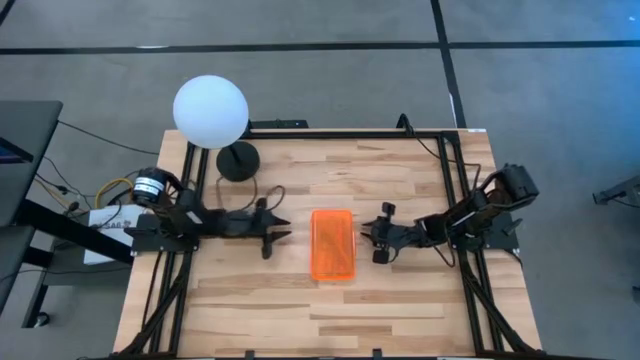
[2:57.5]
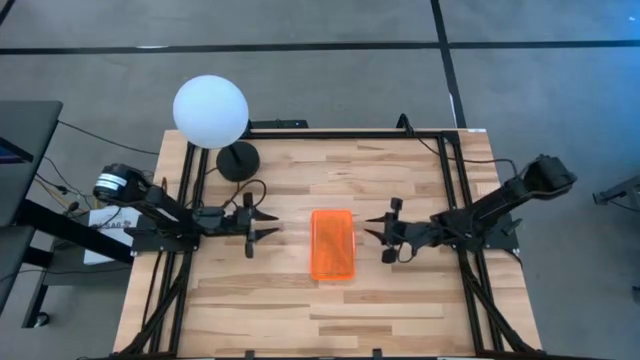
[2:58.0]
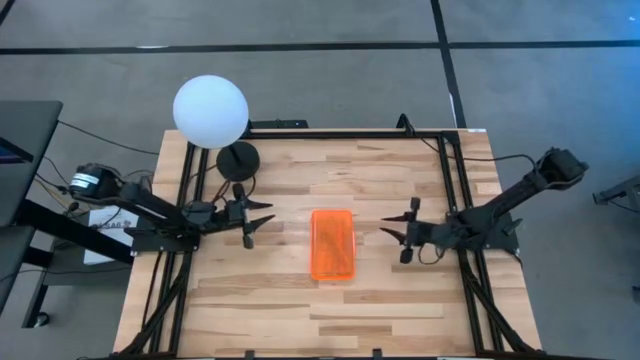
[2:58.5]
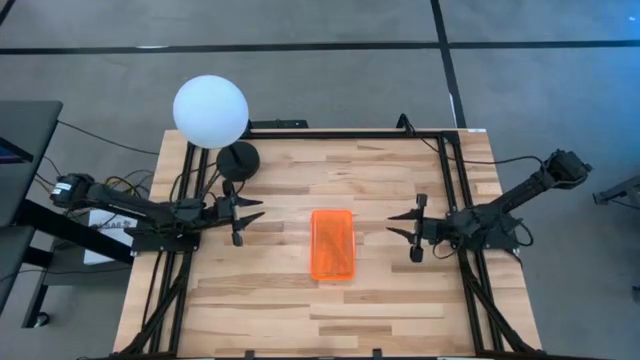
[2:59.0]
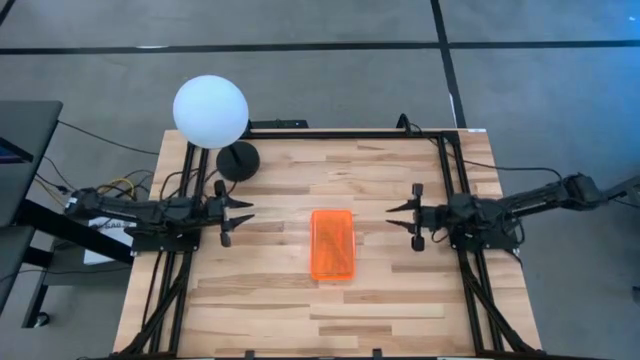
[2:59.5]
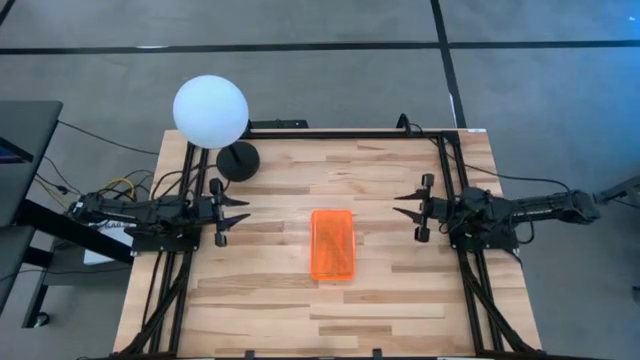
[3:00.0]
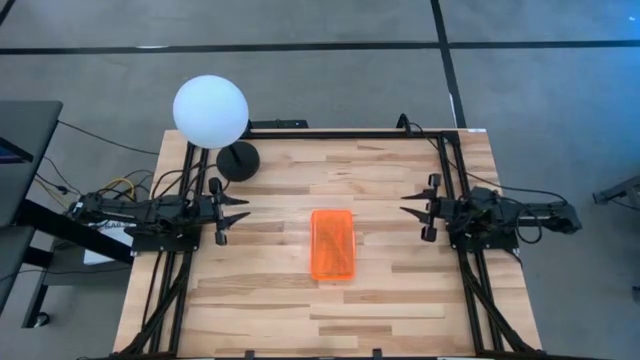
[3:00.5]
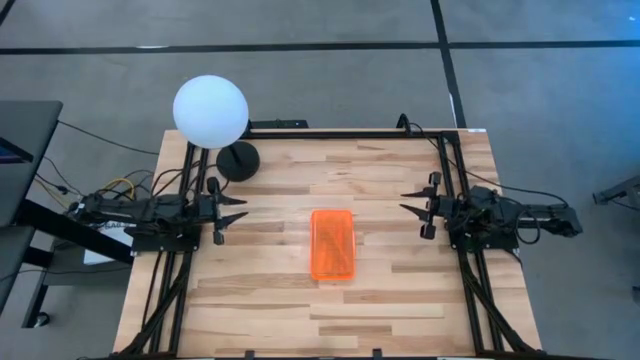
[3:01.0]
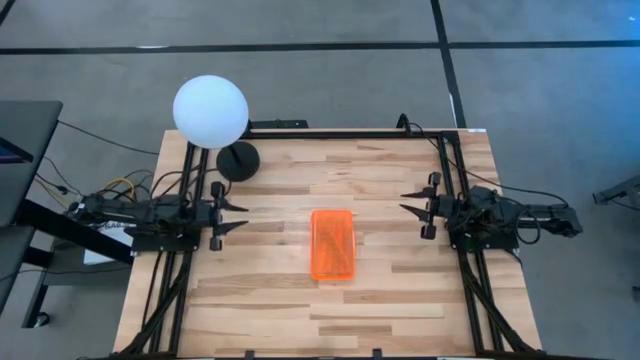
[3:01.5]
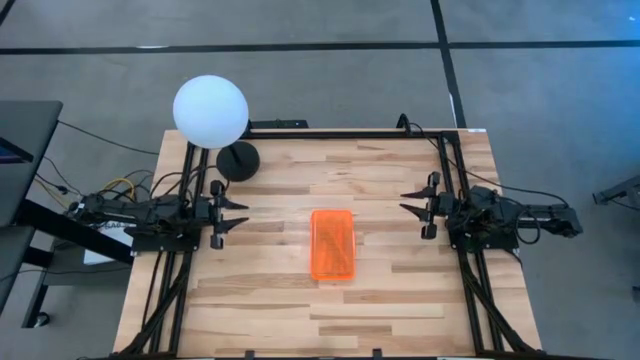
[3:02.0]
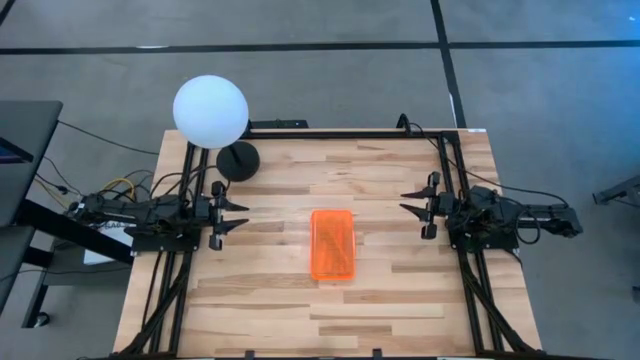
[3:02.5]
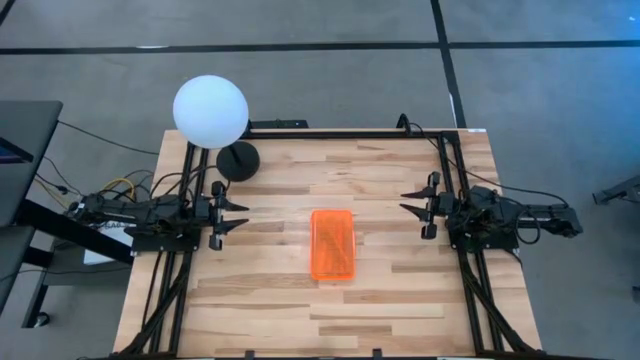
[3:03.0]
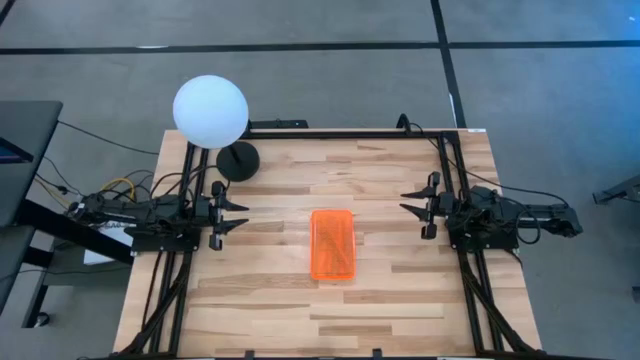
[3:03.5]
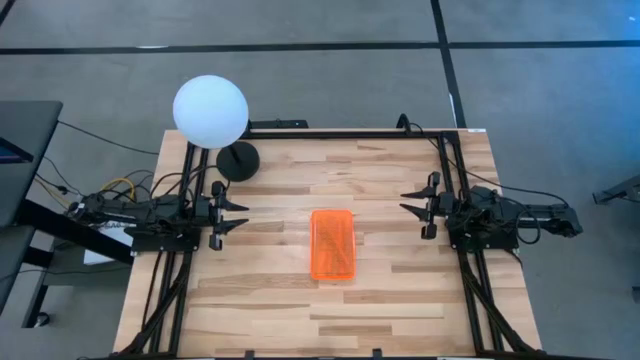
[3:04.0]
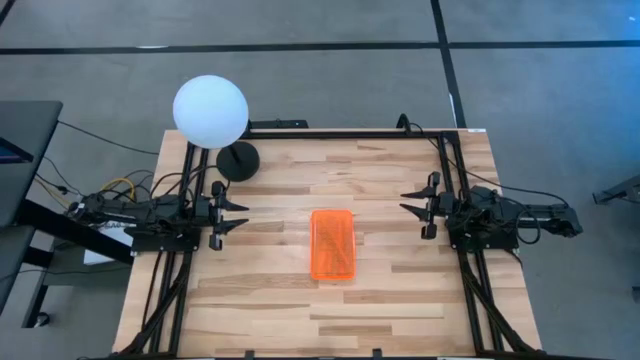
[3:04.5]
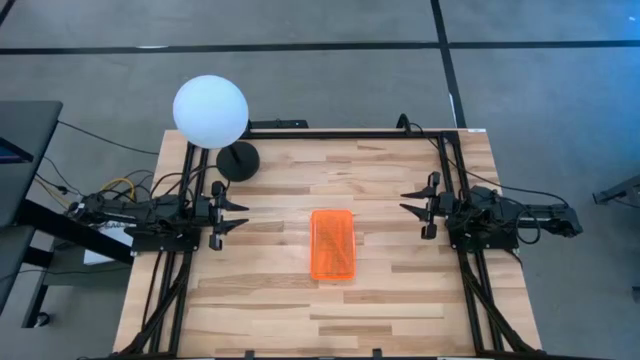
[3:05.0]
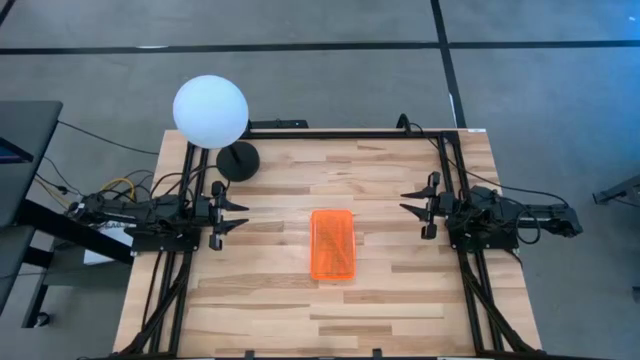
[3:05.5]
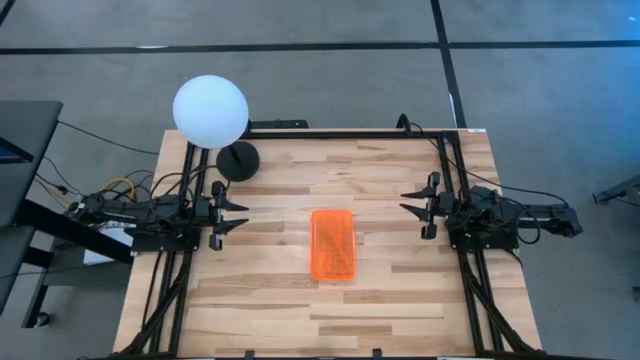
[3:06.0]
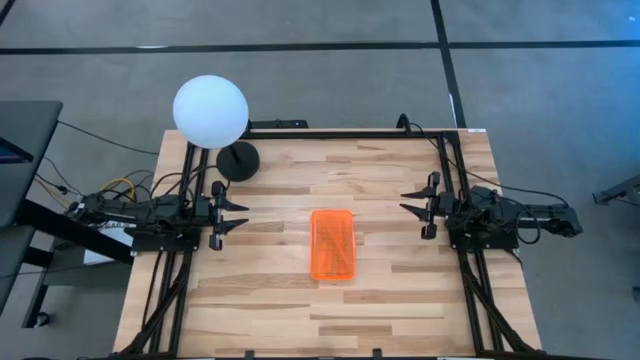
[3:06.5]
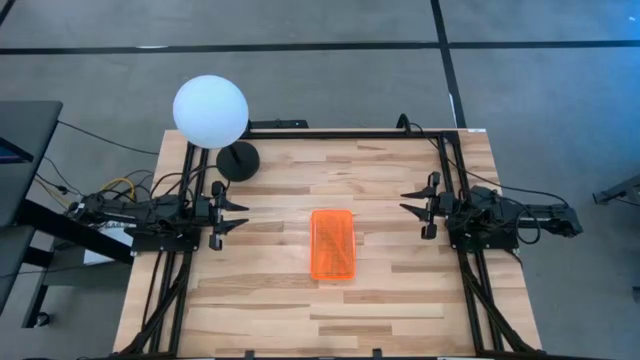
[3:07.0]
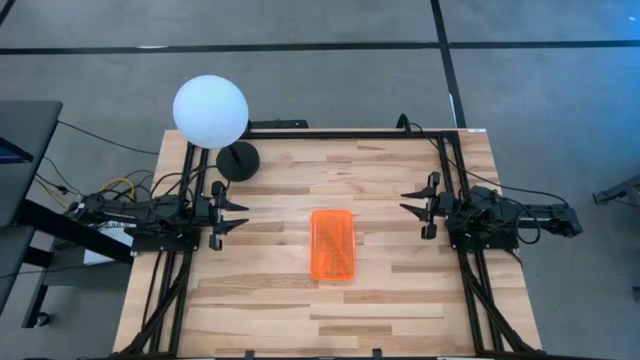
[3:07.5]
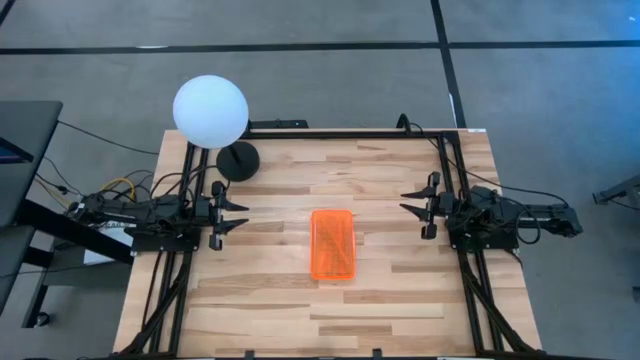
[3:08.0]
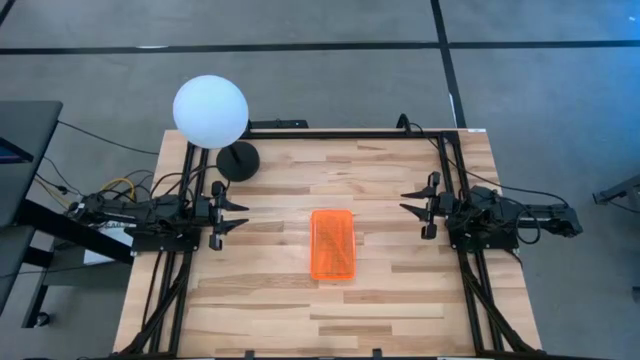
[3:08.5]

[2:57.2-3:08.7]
Task: Pick & place school supplies into a supply box
Return to Home Position

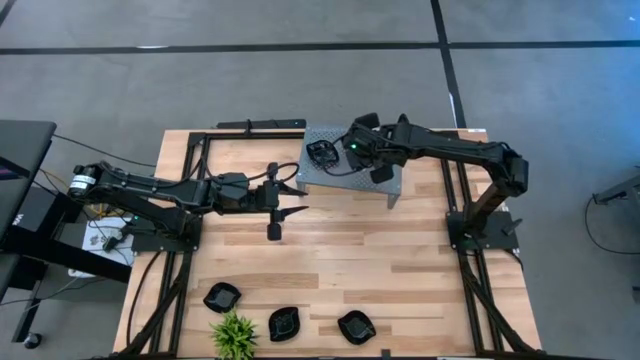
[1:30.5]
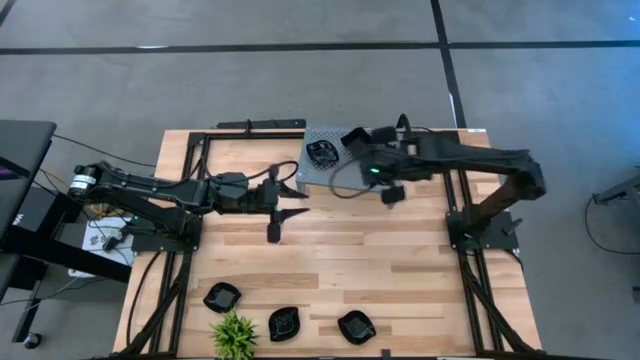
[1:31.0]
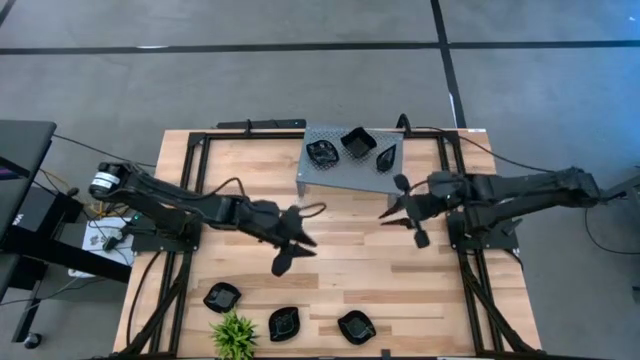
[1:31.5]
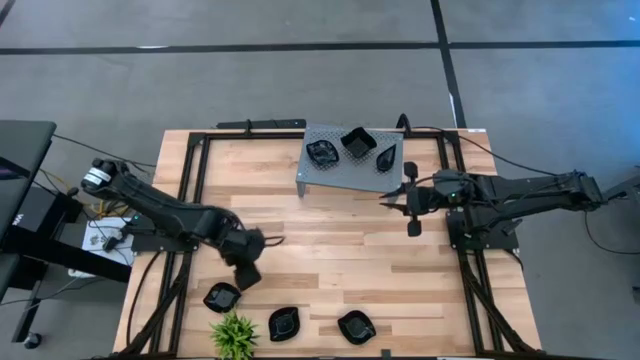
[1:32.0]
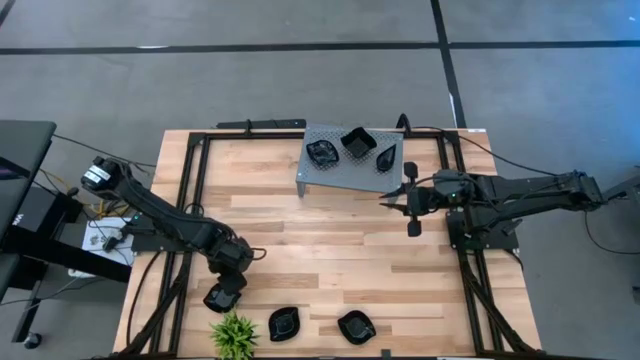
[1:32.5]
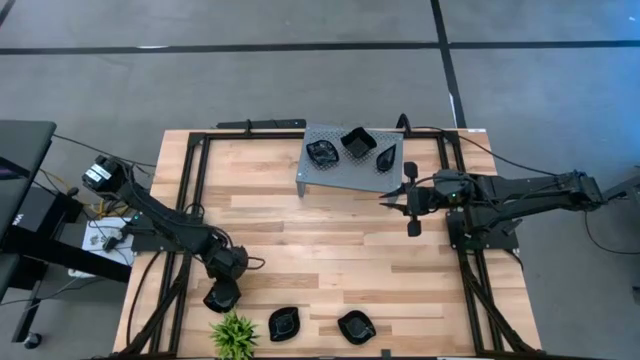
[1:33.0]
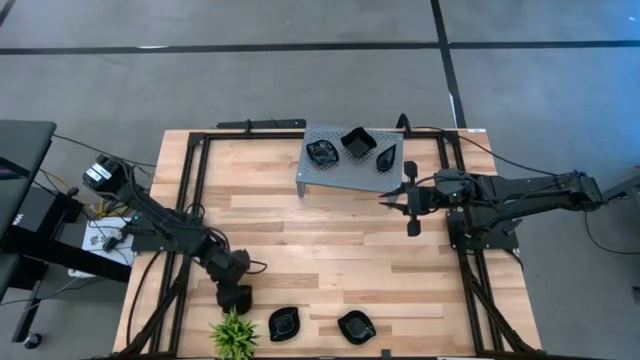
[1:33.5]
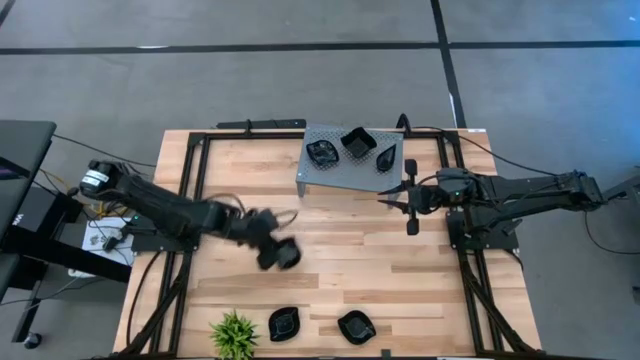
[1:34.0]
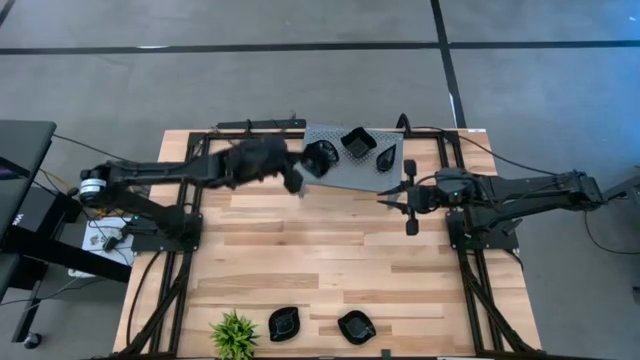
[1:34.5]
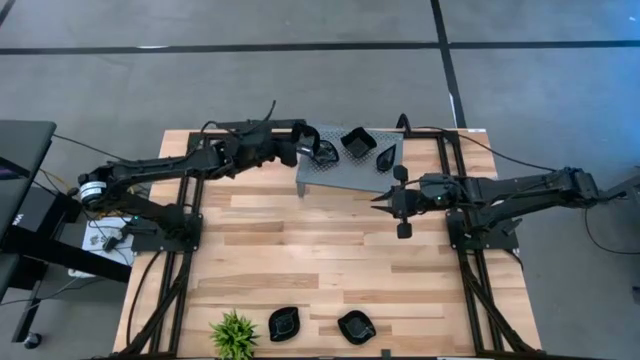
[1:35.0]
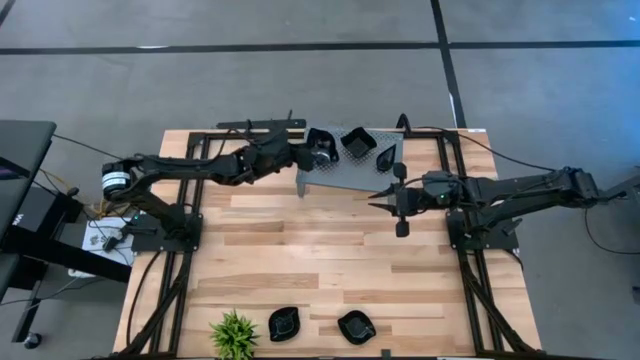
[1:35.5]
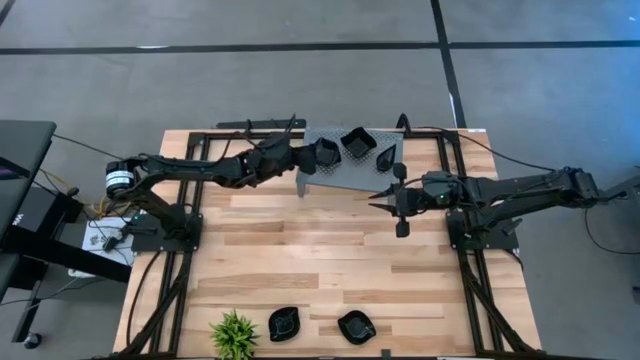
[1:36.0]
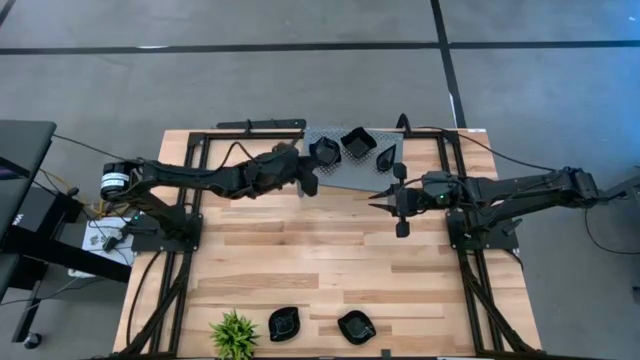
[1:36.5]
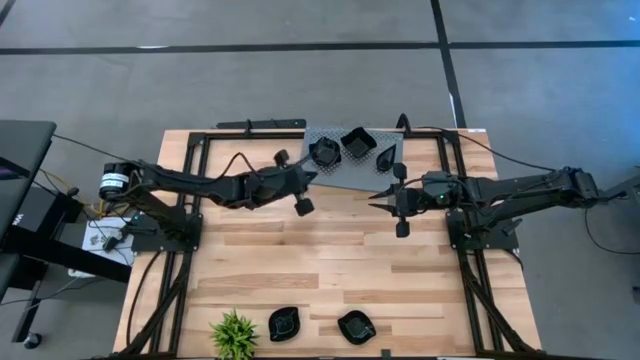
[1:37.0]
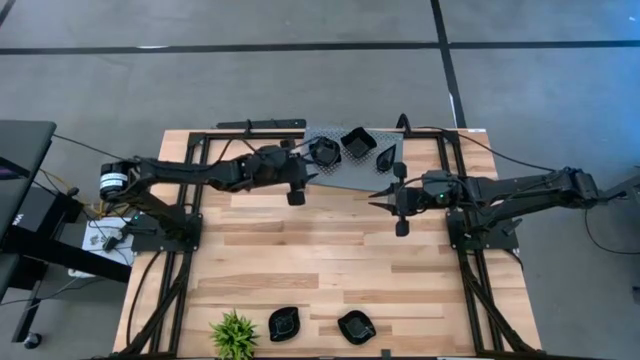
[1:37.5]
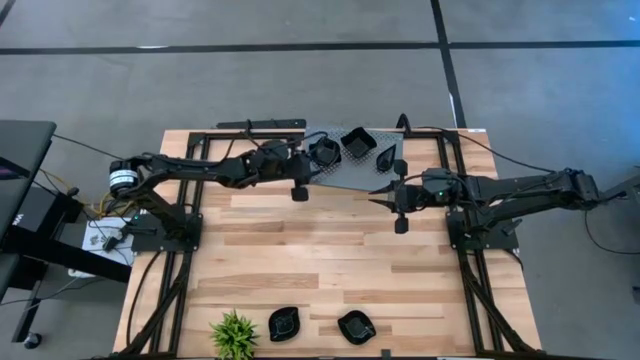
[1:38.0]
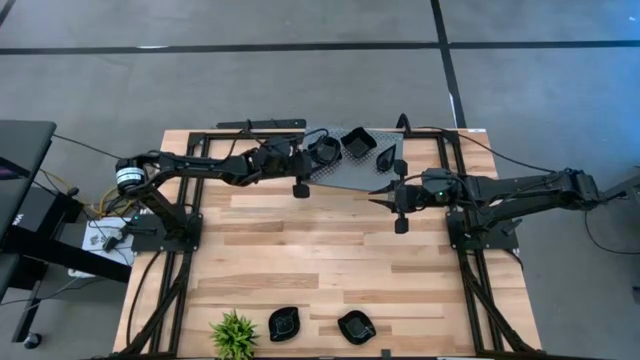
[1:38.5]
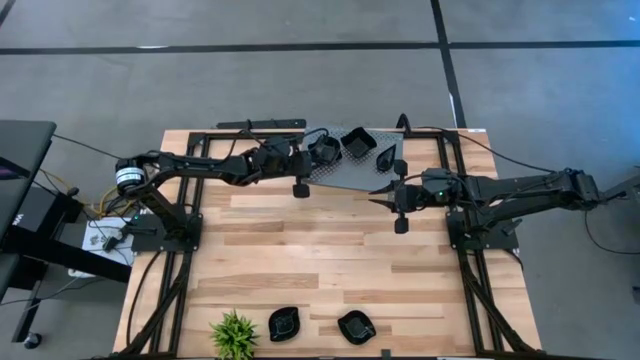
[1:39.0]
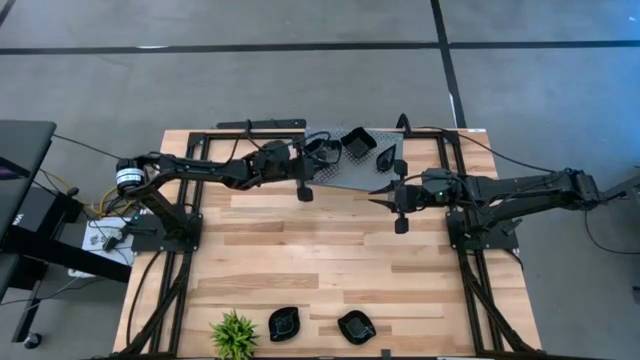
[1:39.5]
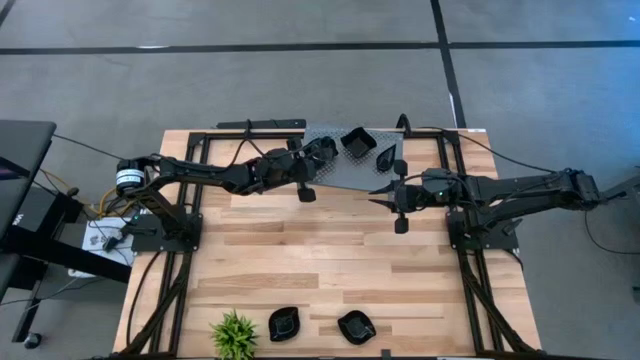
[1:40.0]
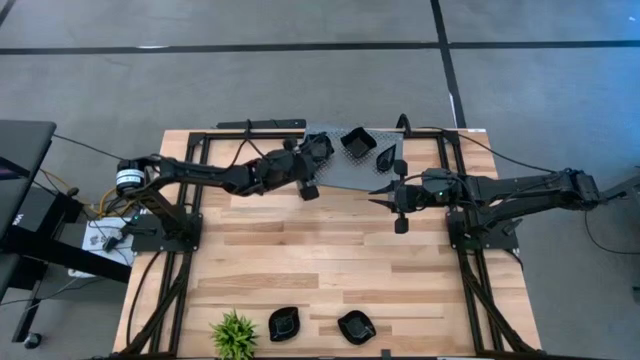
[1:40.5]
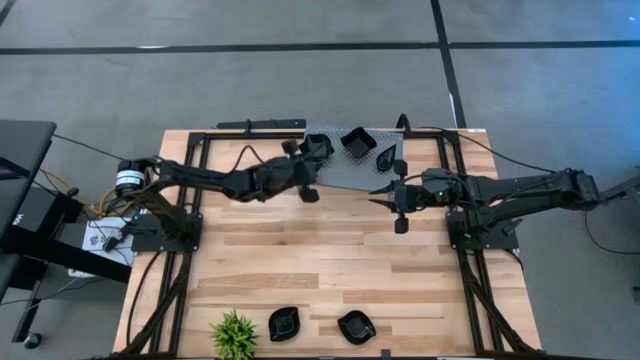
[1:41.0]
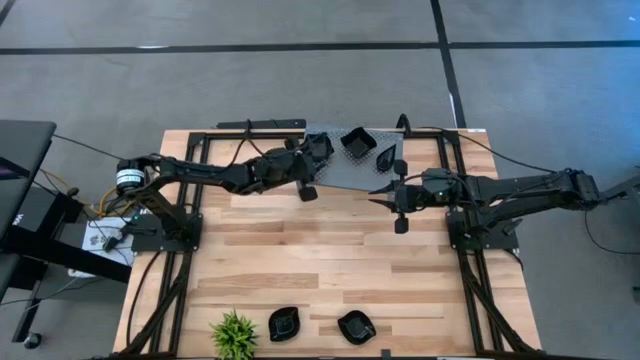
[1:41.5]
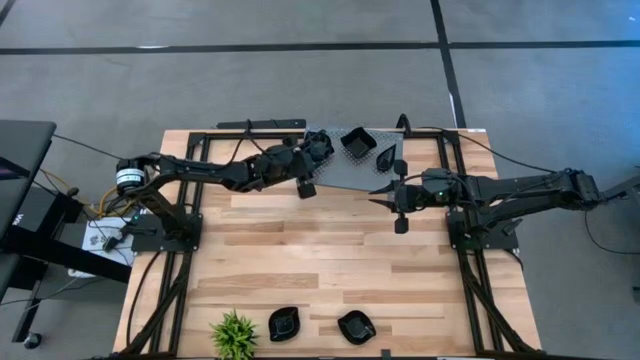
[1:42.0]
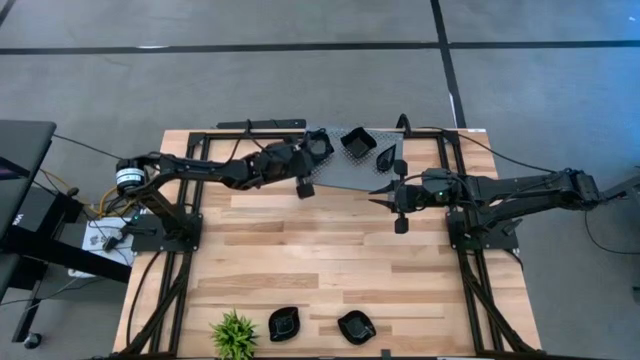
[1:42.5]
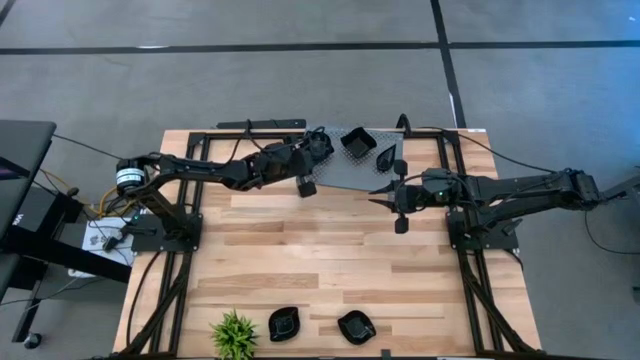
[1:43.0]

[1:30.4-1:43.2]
Task: Pick & Place Mini shaped plates
Stack the black leaf-shaped plate on the other black leaf-shaped plates on the shelf
